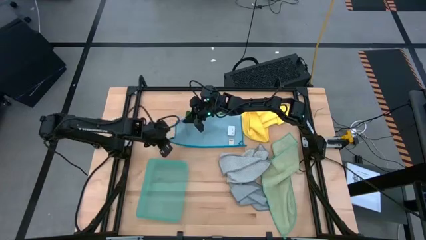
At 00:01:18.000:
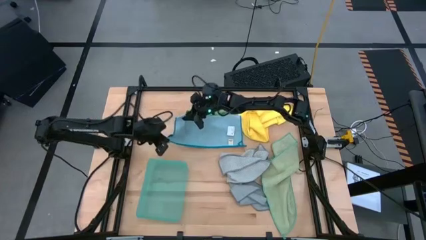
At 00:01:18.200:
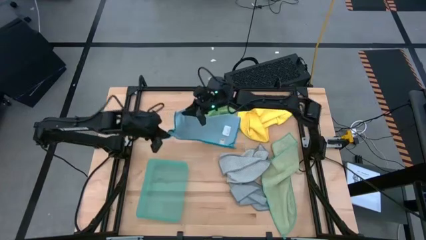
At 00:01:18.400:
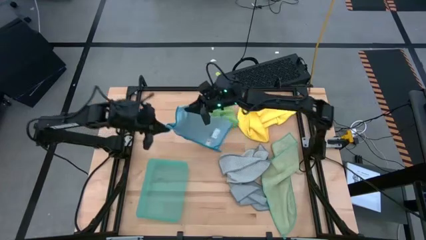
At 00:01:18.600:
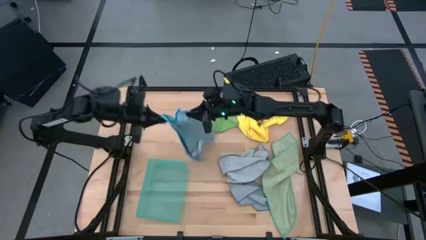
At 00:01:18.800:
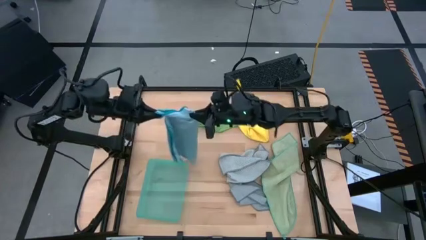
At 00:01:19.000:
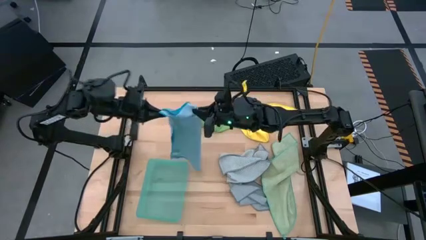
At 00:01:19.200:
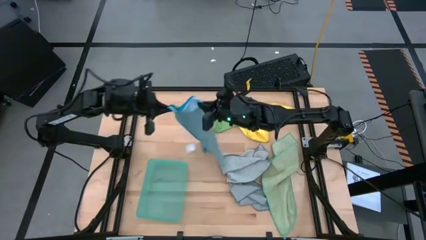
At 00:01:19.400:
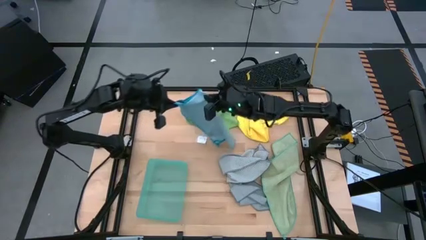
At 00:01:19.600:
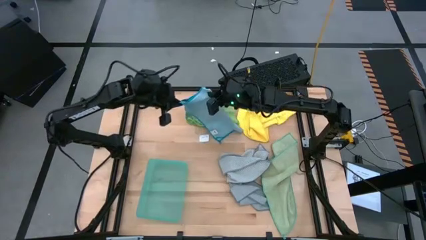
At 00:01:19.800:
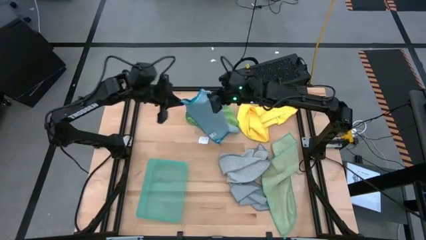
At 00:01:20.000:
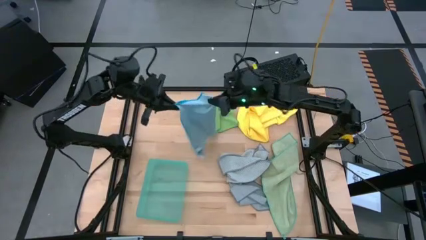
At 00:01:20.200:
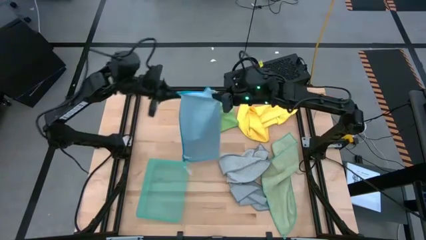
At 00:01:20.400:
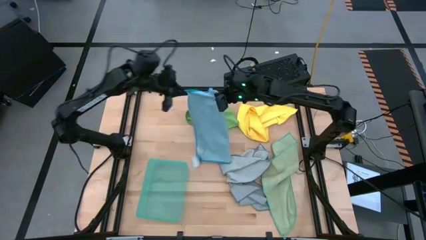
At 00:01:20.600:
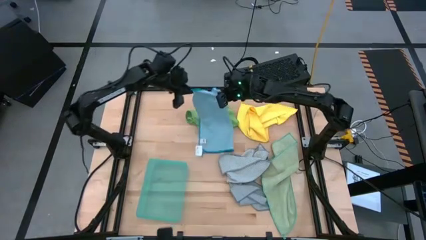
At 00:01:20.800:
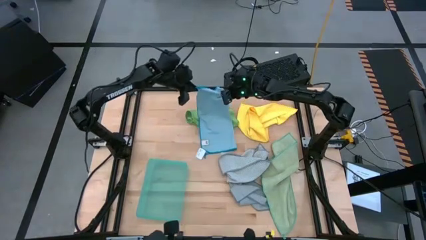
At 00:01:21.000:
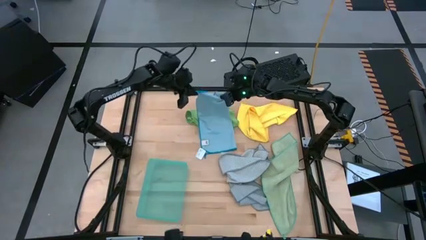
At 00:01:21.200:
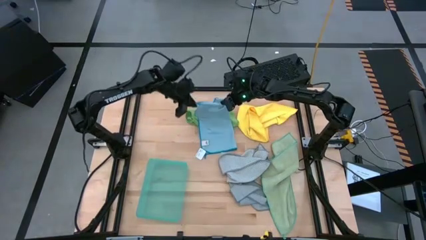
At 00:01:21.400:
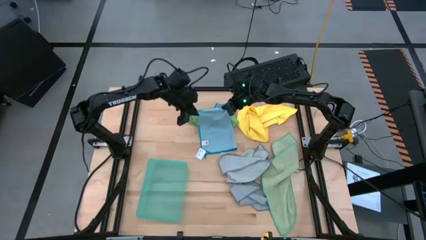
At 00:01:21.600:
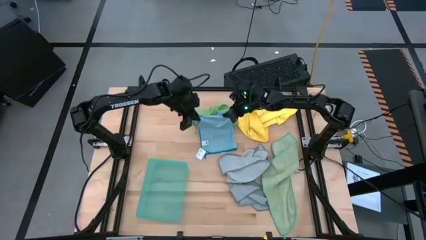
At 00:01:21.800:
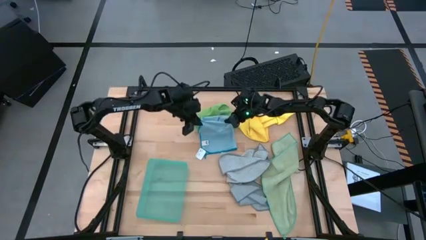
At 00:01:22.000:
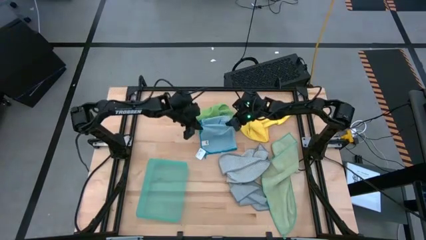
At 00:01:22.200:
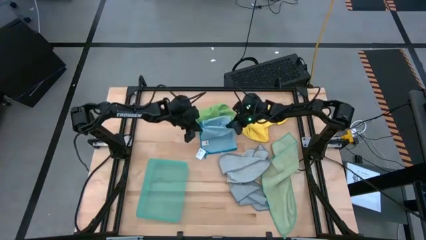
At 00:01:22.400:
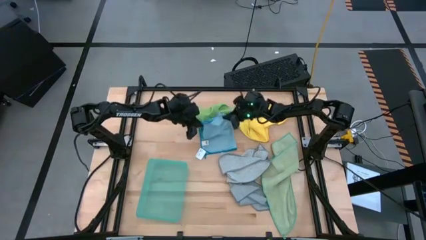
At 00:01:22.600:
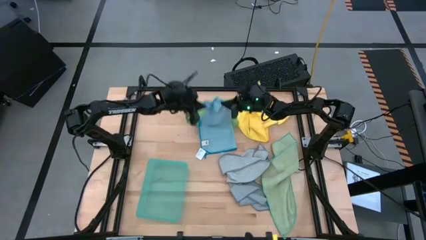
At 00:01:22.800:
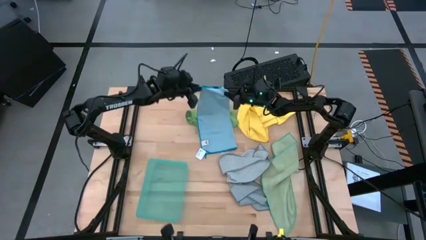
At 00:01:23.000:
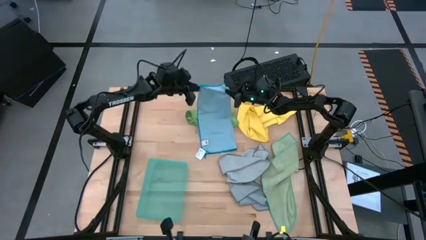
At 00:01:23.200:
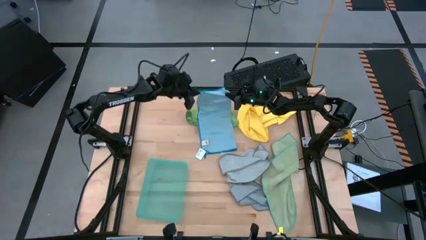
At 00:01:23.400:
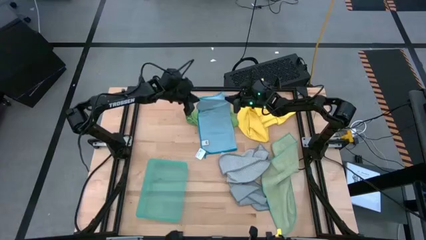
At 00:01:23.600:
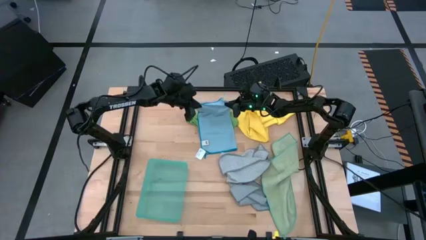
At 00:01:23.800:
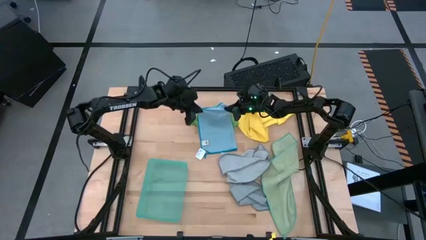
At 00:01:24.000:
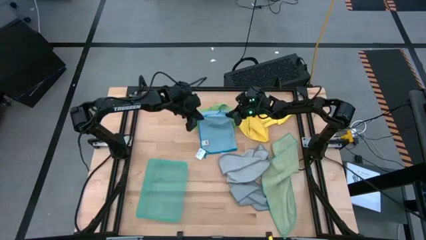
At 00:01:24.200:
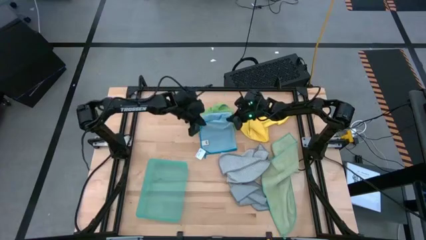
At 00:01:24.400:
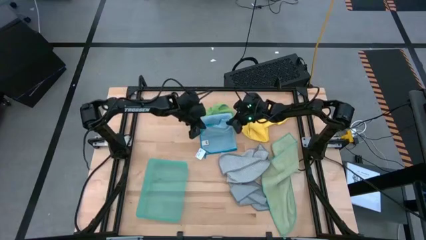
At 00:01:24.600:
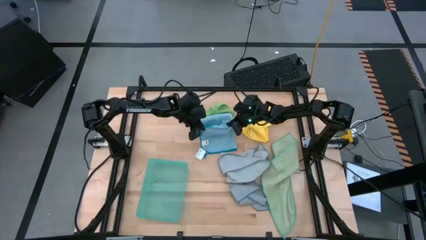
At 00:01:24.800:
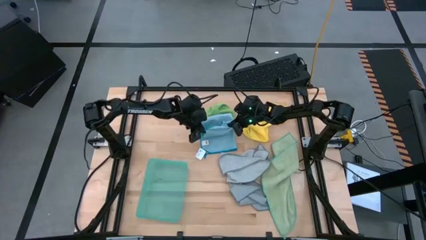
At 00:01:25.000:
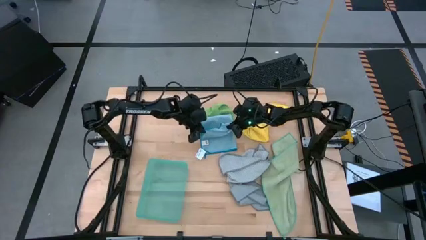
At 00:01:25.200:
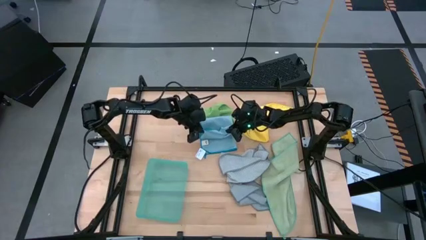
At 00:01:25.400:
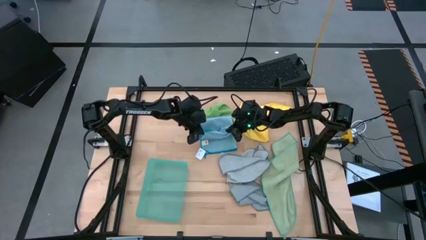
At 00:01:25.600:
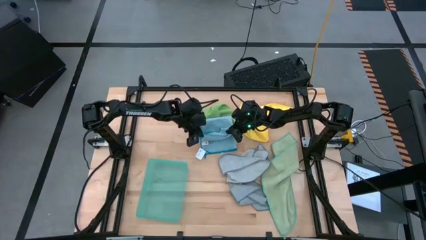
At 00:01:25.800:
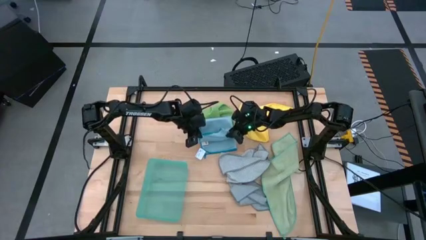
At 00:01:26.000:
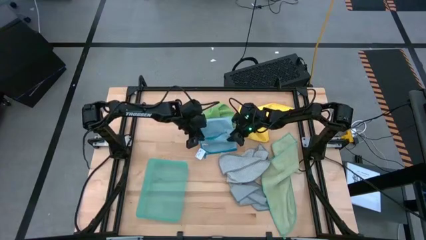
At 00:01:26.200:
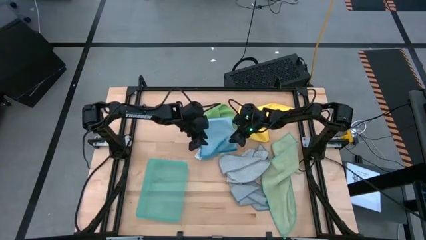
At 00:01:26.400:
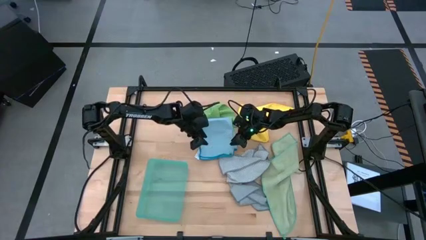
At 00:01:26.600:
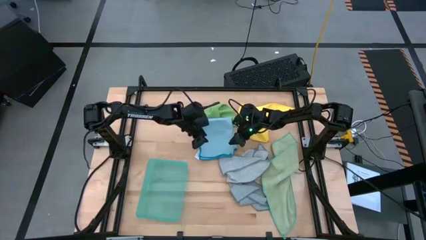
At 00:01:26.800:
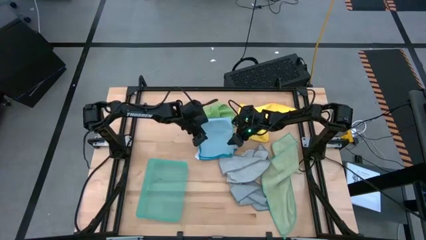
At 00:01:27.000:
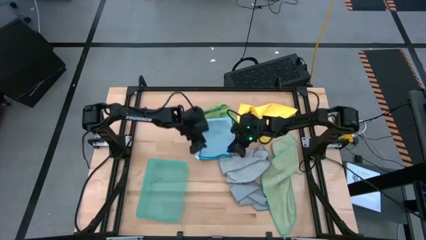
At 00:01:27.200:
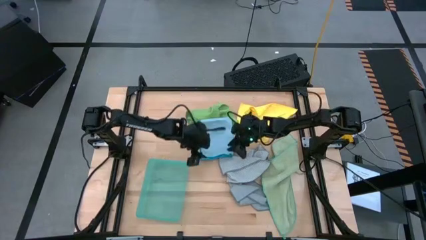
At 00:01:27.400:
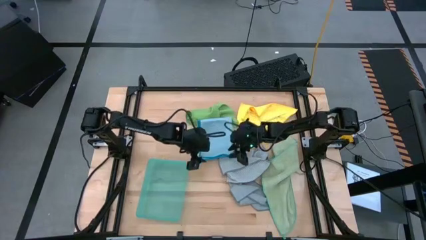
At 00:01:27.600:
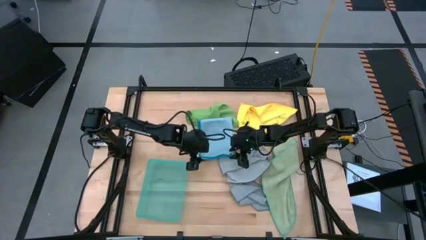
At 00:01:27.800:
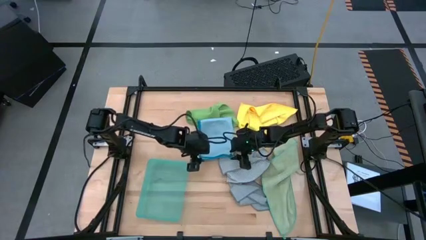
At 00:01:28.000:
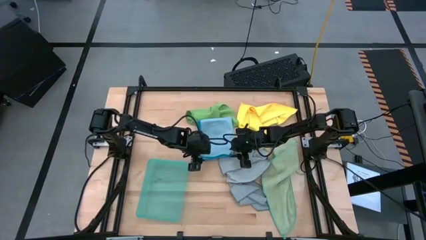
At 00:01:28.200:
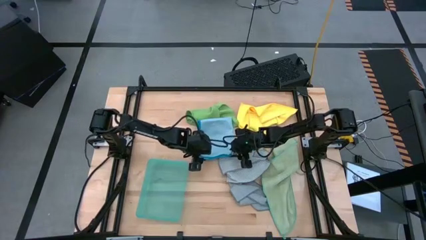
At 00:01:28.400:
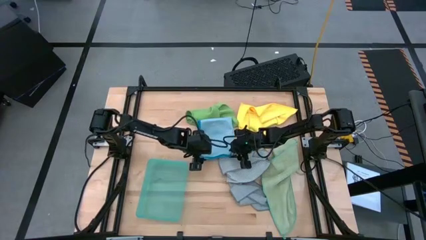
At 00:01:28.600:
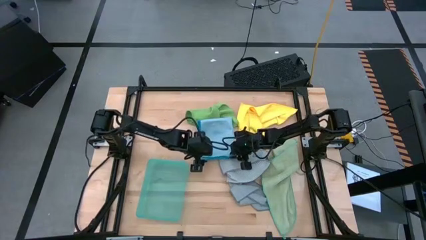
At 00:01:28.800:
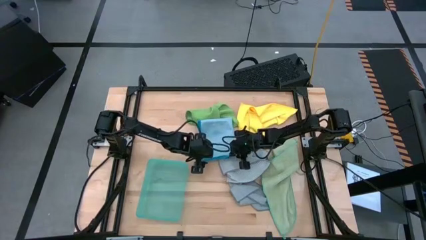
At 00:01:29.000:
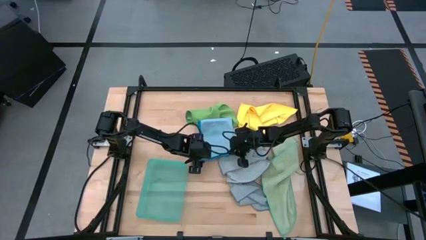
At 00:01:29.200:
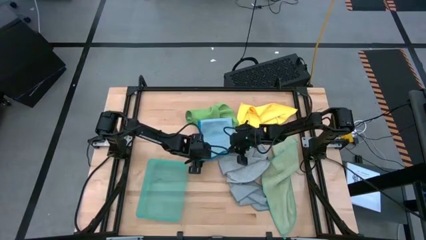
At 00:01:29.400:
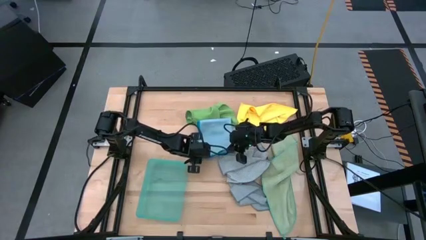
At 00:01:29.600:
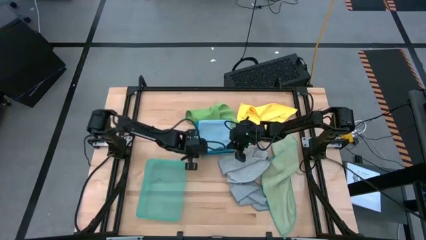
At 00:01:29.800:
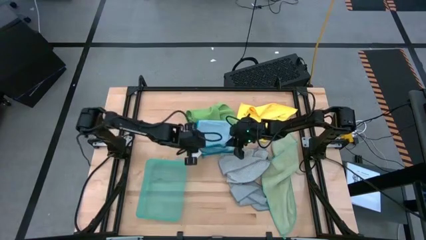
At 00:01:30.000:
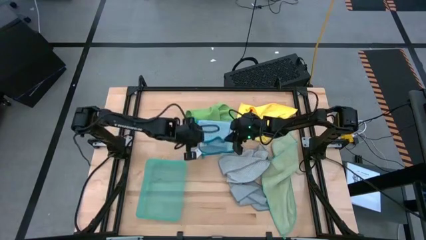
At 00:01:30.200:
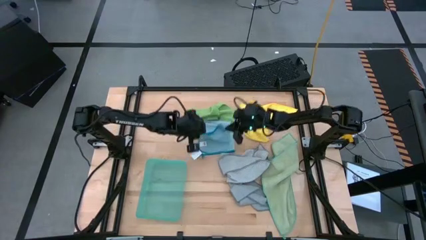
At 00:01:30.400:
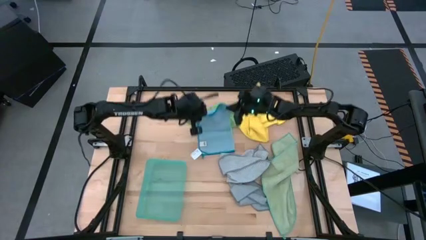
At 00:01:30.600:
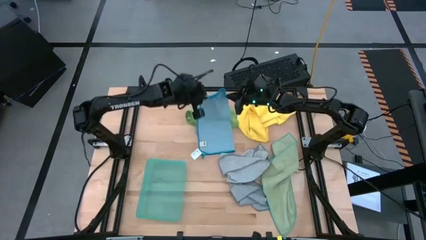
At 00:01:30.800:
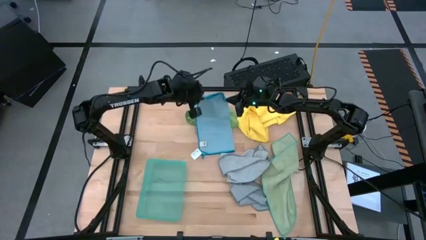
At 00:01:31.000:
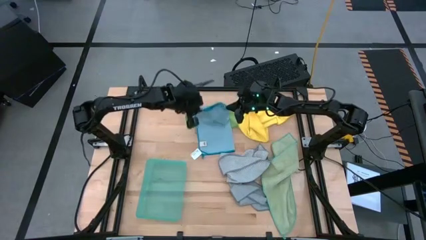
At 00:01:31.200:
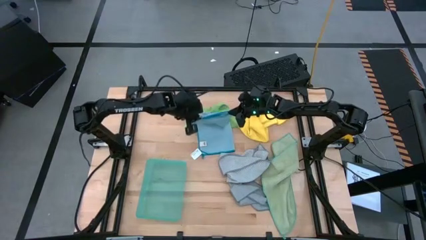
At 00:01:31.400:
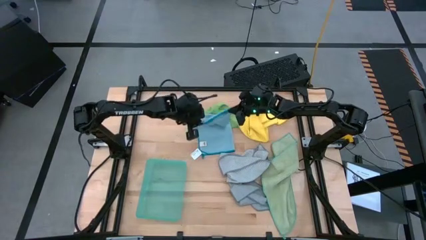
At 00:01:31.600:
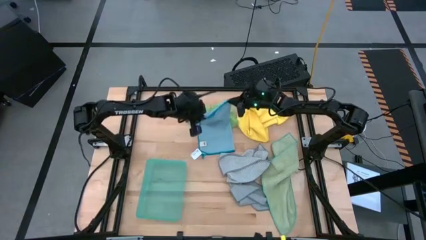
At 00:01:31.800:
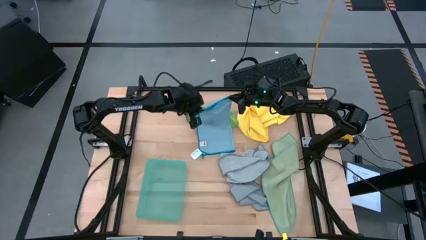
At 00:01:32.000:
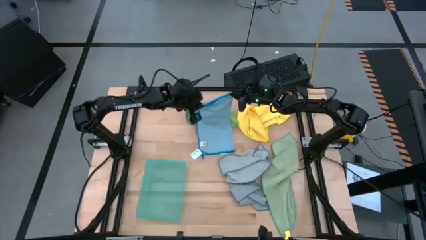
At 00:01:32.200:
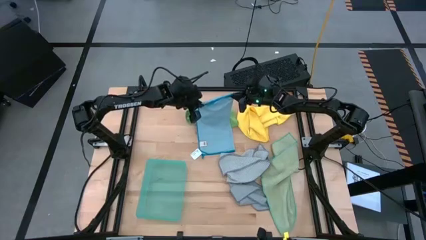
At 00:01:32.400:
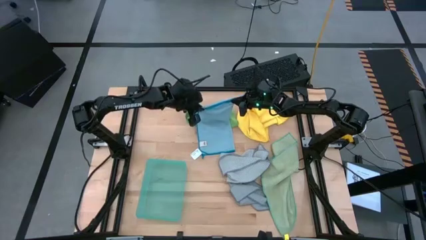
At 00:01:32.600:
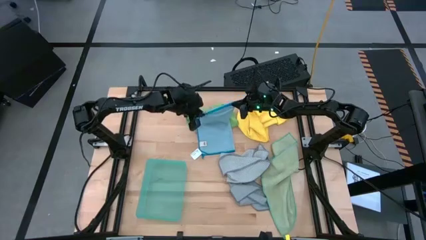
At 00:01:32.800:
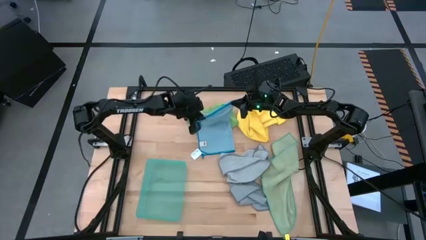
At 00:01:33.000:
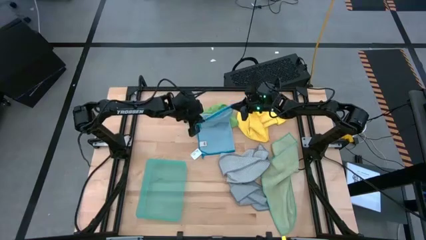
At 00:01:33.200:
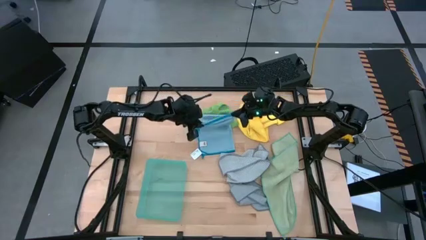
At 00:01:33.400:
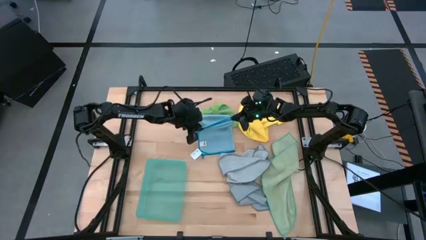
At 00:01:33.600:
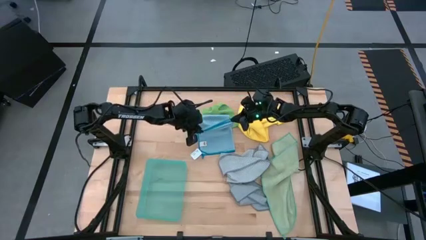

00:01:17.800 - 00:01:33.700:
Task: Fold microfiber towels
Fold the blue microfiber cloth

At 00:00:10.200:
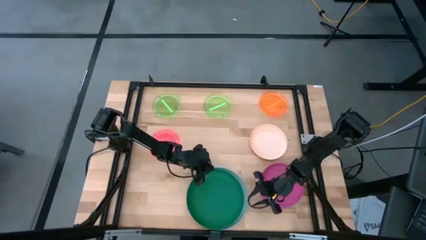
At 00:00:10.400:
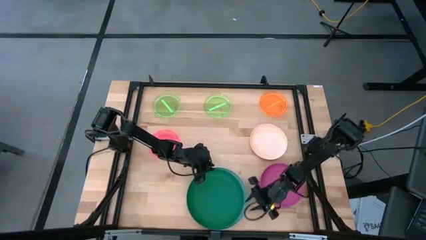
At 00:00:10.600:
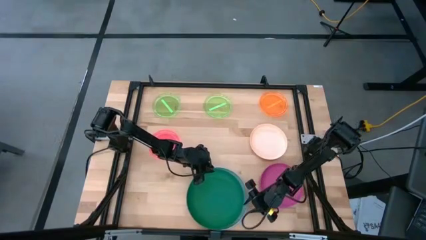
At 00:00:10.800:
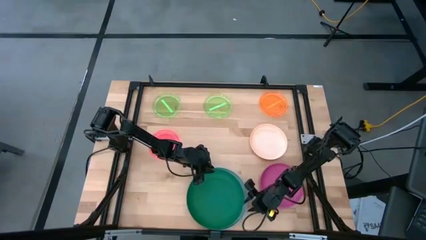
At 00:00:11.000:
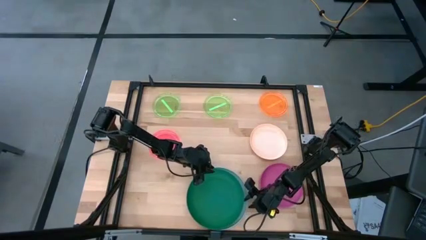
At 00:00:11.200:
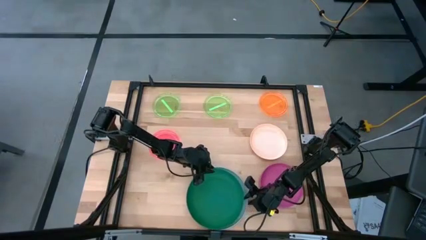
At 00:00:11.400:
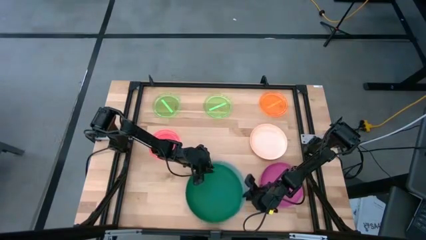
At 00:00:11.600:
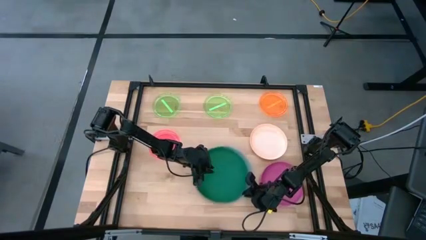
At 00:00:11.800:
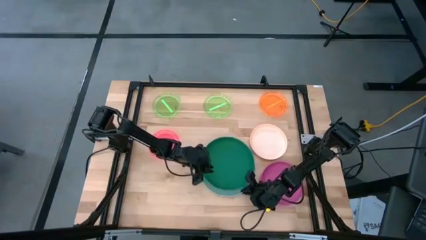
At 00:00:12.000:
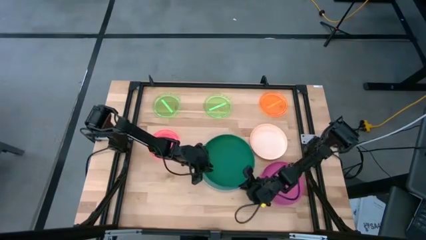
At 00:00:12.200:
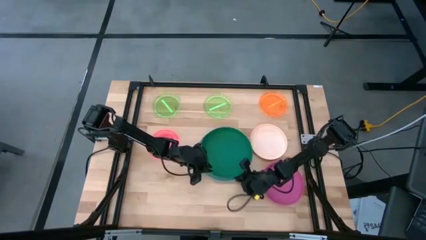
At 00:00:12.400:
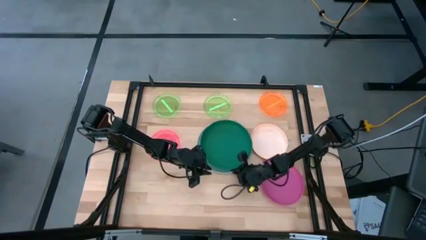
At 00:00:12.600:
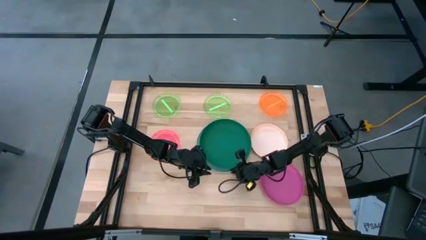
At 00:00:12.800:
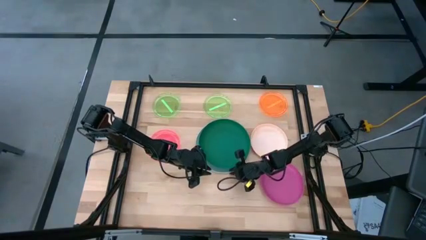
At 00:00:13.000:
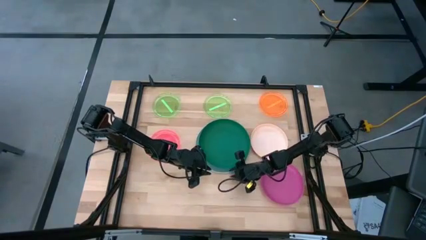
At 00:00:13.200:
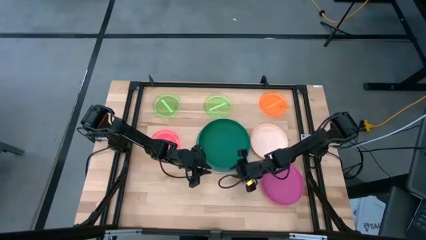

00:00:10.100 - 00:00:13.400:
Task: Stack plastic plates
Move the stacked plates to the center of the table
